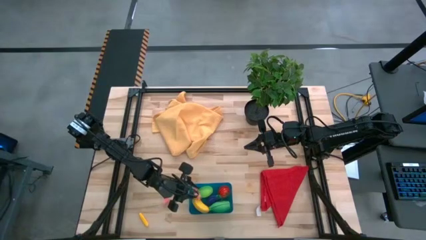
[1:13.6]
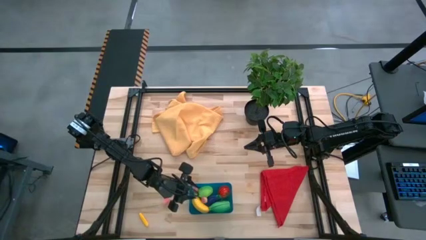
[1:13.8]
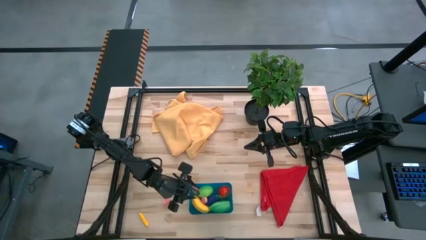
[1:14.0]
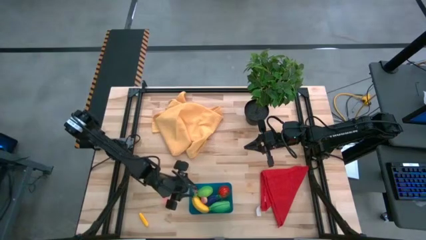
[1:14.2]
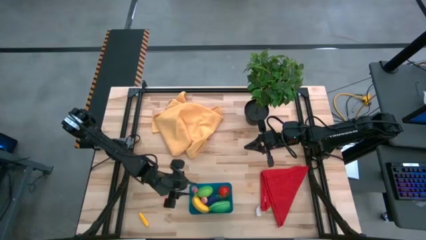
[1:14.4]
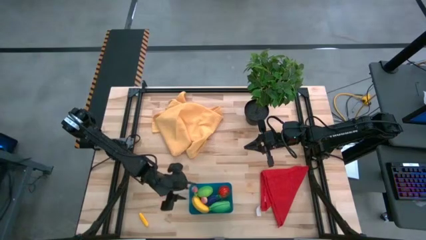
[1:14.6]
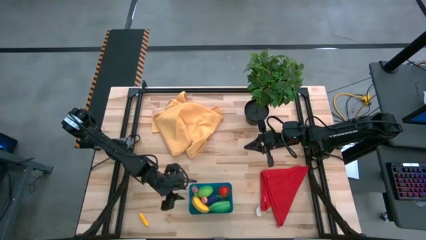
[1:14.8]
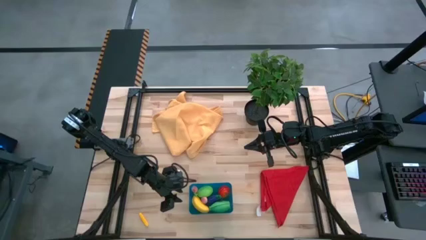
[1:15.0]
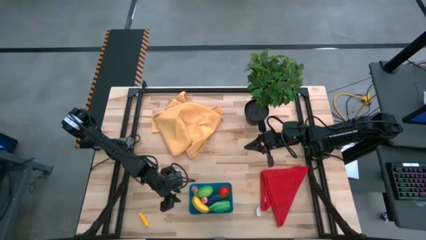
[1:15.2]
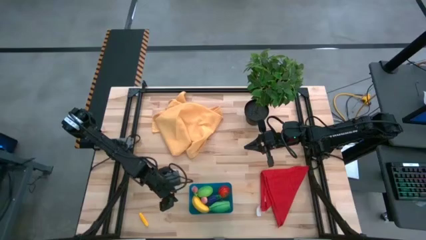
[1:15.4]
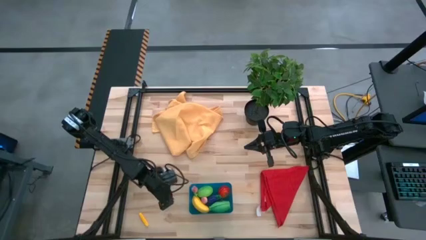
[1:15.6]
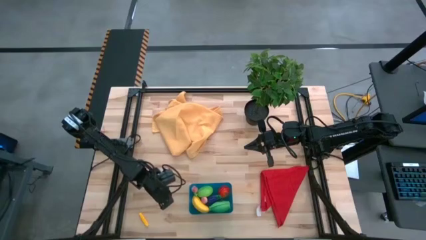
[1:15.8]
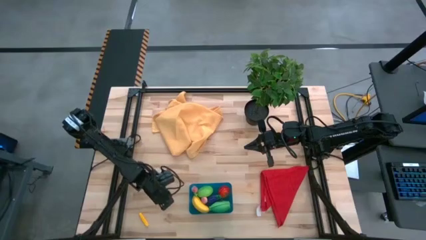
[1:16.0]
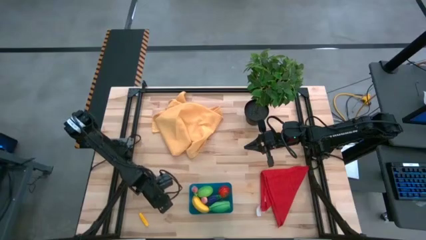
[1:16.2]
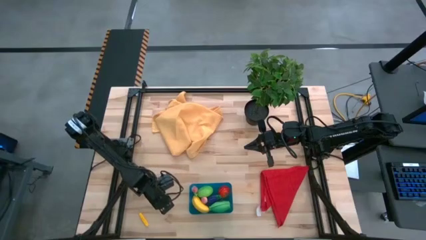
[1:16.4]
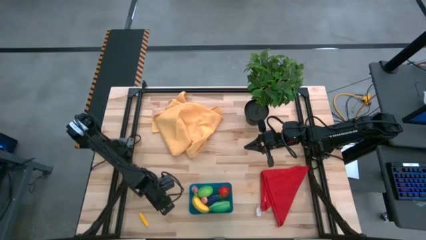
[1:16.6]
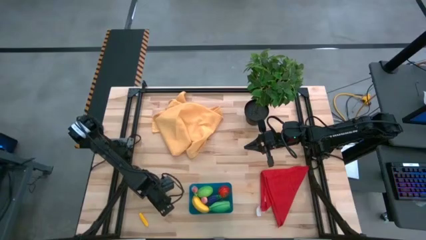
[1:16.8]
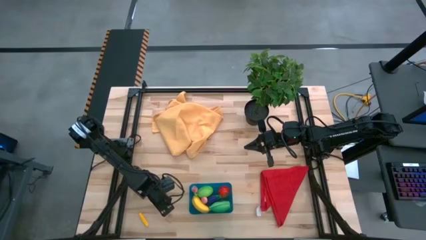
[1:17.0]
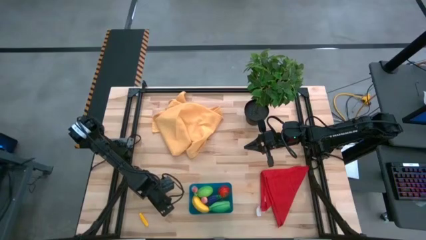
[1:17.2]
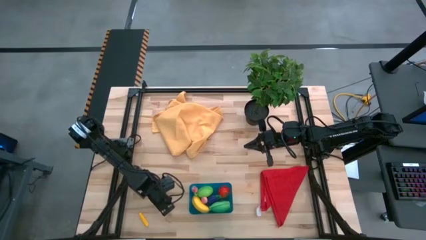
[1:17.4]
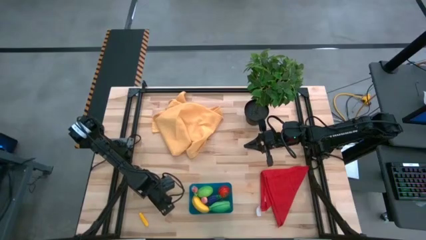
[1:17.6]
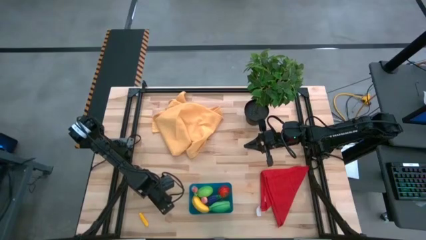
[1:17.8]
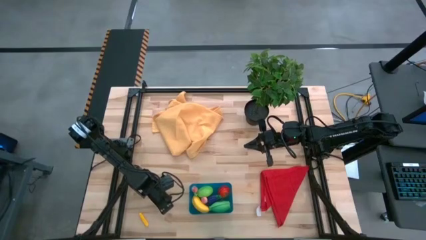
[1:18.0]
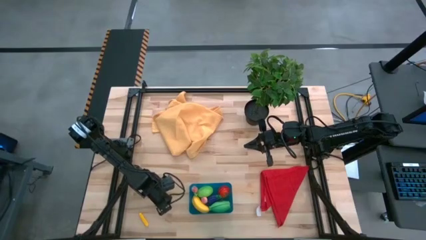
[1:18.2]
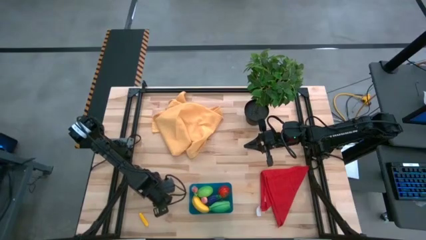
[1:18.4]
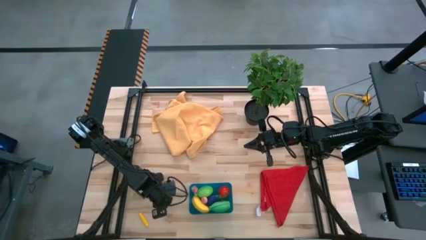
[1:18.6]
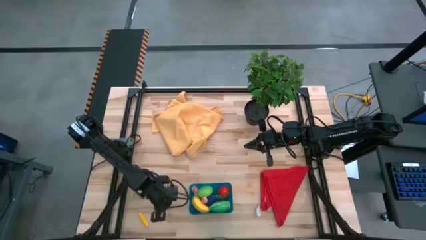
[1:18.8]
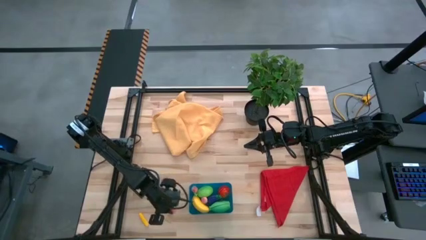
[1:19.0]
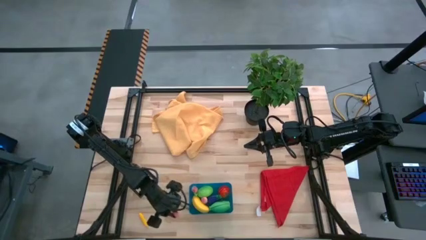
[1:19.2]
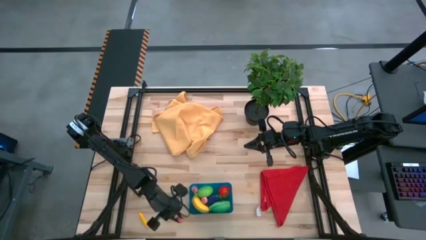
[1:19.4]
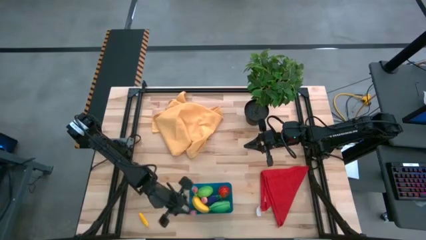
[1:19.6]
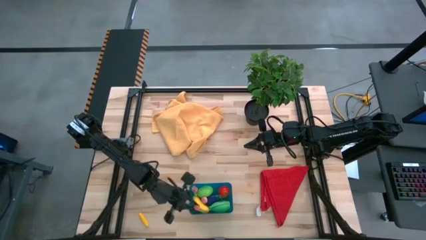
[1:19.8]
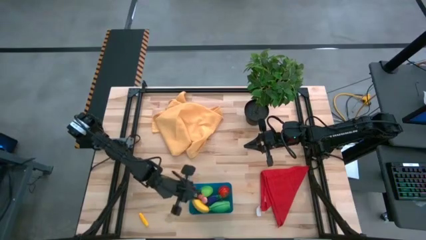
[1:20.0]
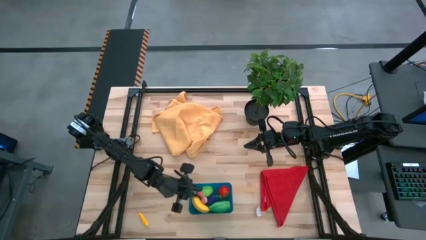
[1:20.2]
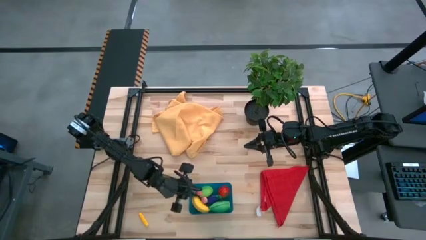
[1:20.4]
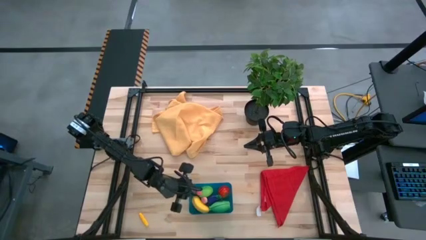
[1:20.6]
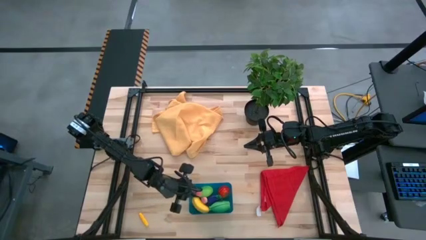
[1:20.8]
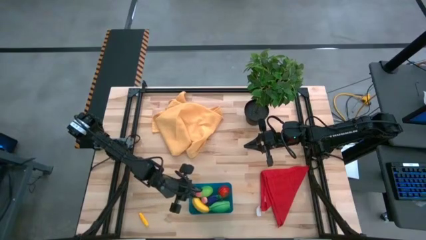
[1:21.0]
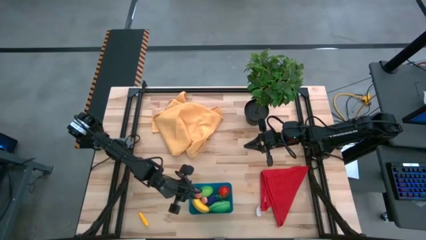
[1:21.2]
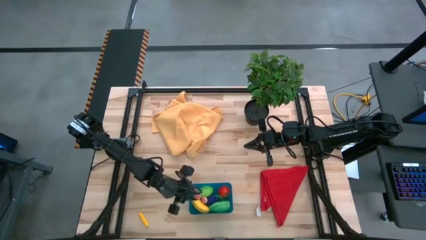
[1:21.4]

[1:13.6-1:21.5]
Task: Pick and placing Produce into tupperware
Put the pink peach into the blue bin

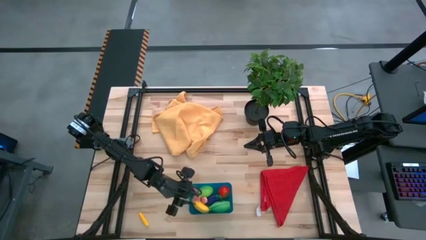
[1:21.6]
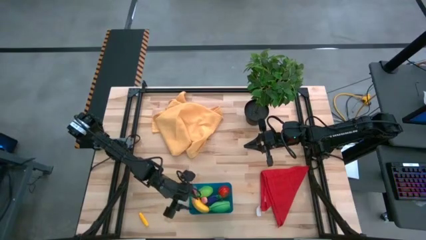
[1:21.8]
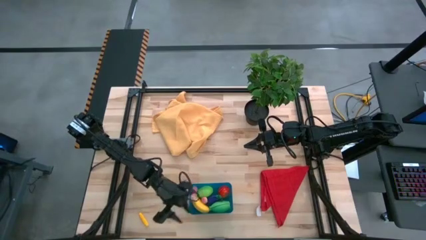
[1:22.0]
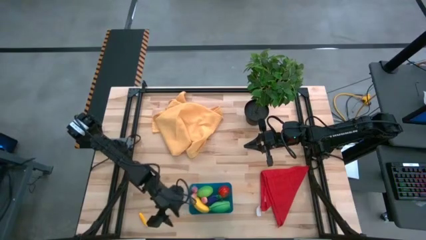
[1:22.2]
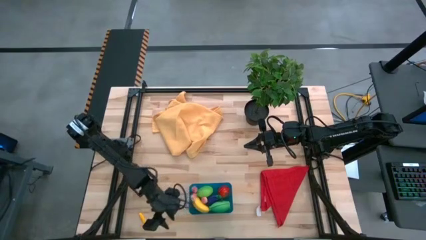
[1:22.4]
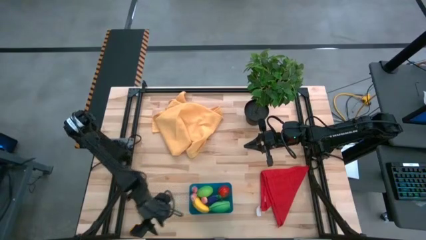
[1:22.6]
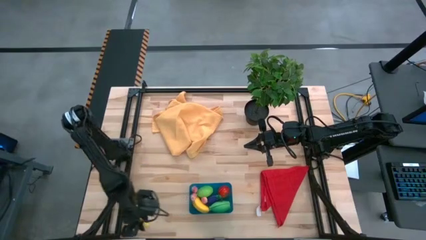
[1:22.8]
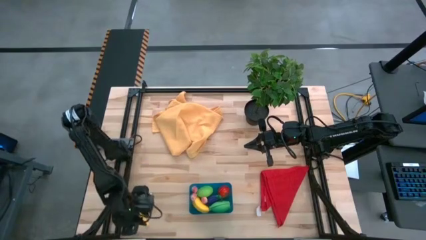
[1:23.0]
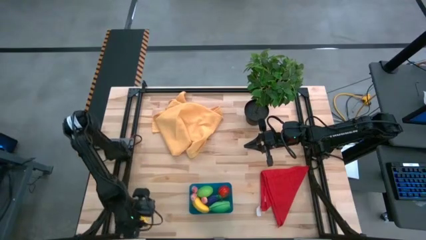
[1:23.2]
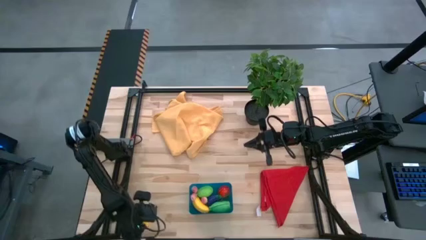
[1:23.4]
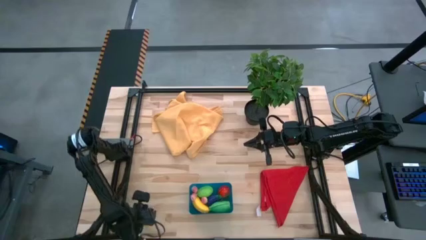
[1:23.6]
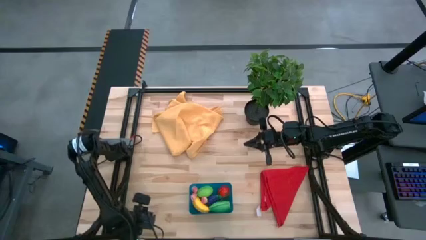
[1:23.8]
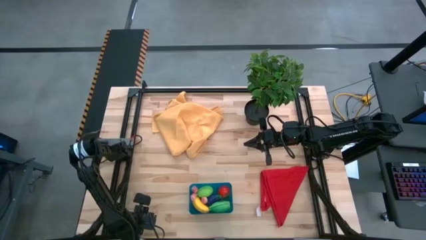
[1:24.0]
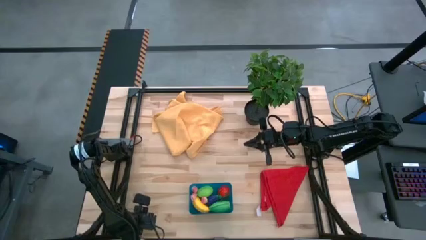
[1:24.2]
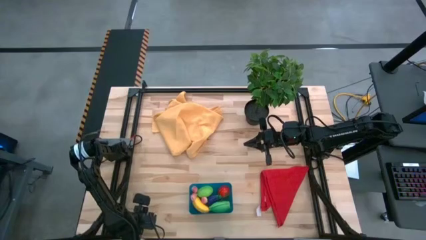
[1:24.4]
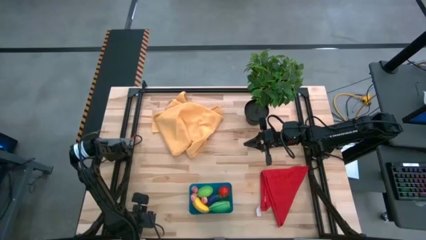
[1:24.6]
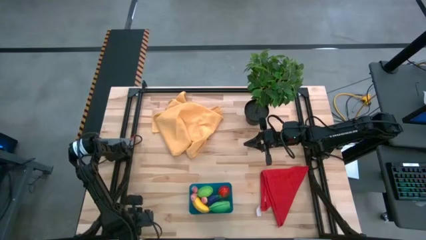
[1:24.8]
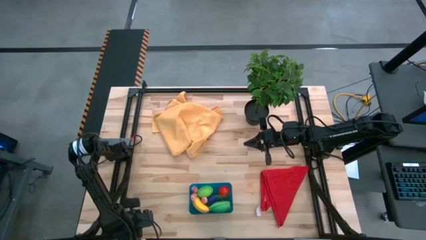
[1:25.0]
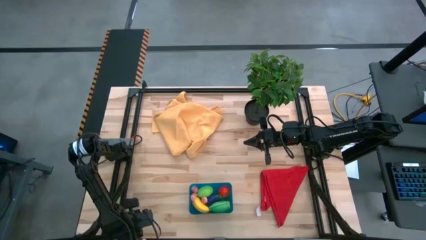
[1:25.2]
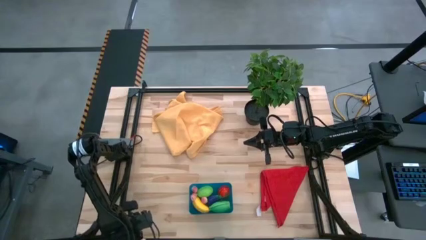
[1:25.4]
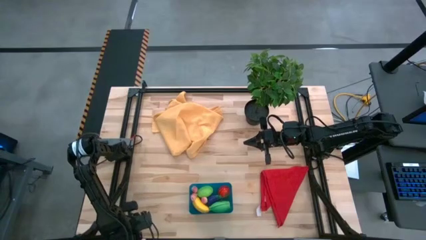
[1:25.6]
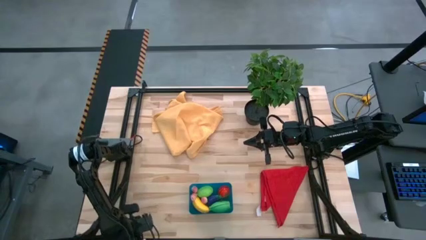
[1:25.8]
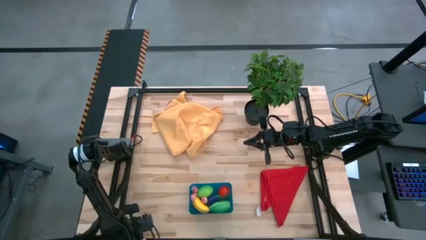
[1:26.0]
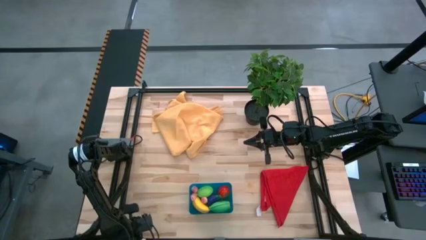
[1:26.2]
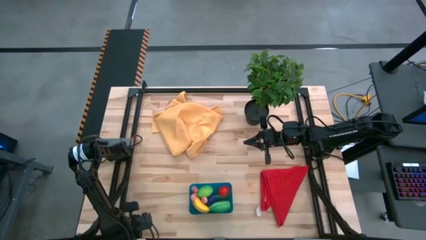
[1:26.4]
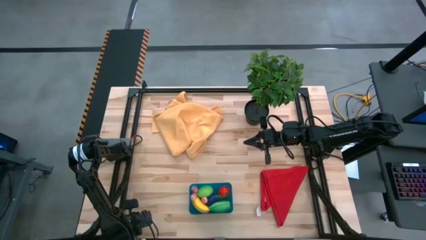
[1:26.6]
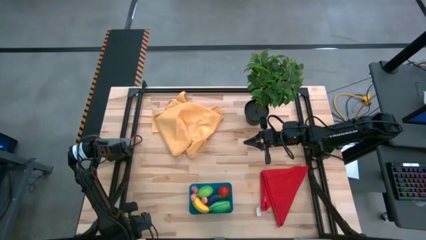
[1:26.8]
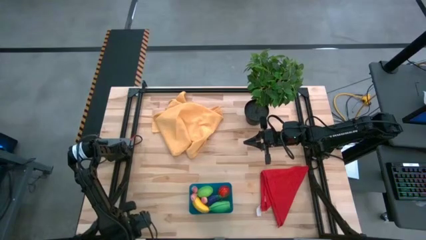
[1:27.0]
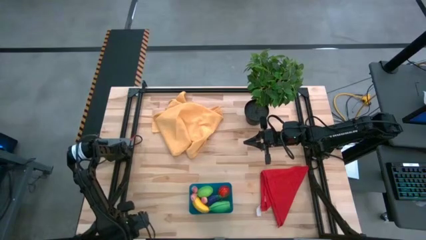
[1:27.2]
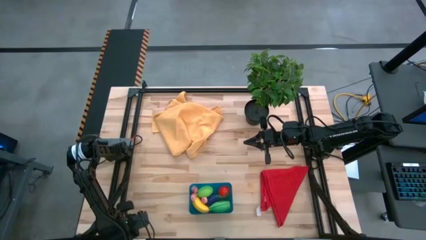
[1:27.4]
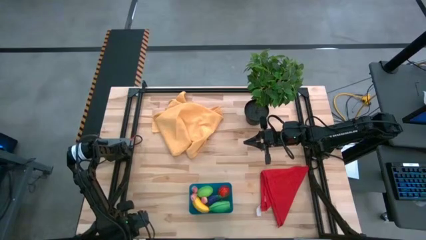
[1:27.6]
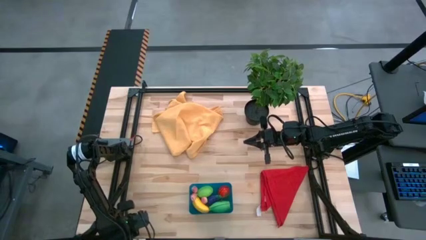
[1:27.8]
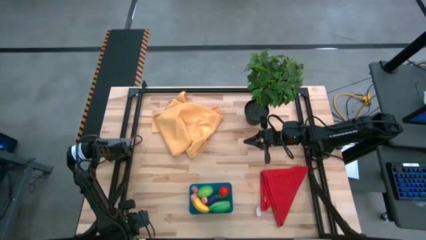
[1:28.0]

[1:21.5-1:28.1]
Put the yellow corn into the blue bin
